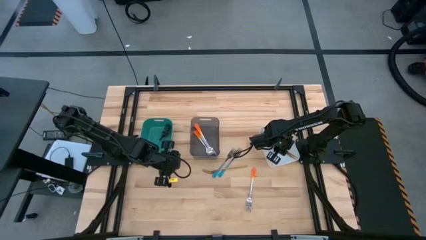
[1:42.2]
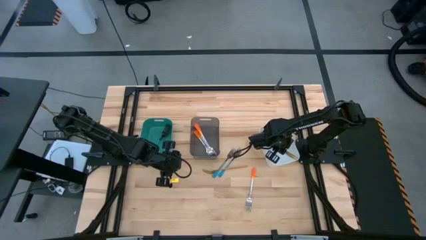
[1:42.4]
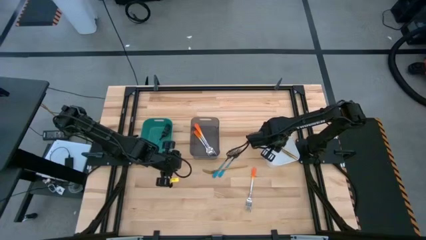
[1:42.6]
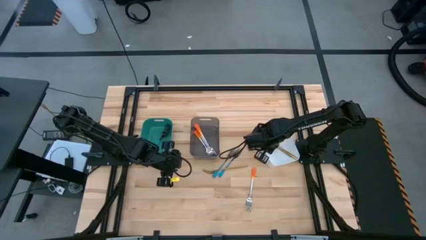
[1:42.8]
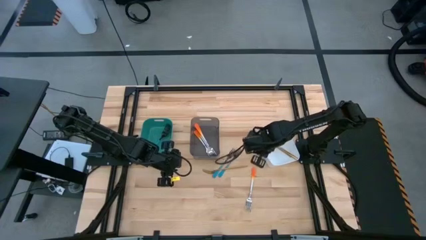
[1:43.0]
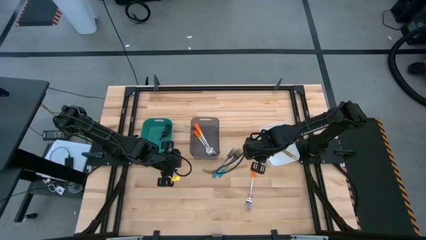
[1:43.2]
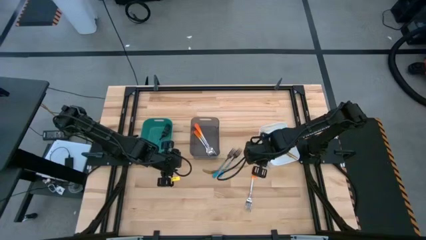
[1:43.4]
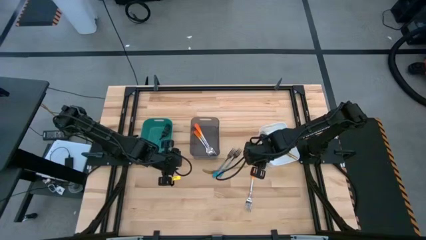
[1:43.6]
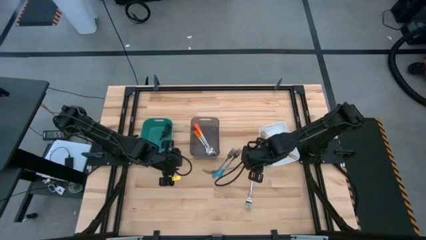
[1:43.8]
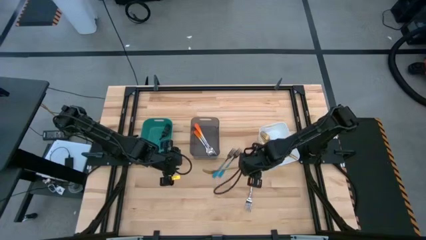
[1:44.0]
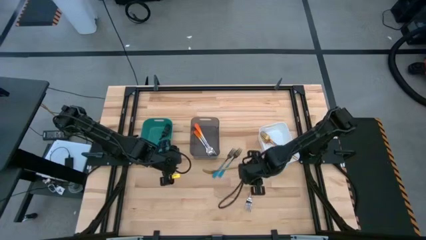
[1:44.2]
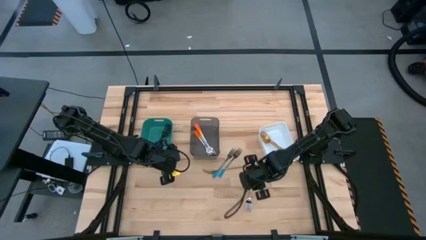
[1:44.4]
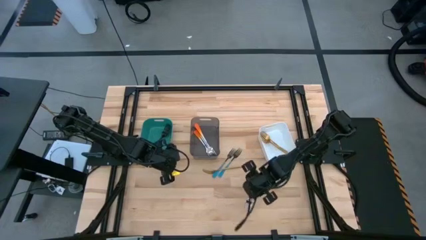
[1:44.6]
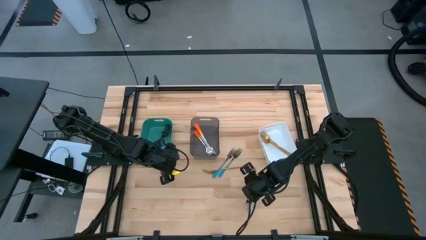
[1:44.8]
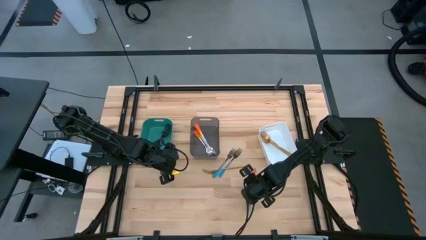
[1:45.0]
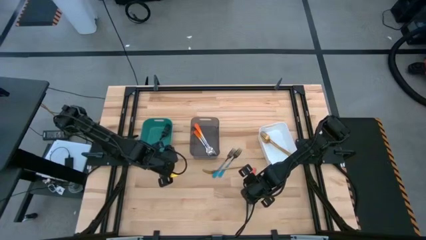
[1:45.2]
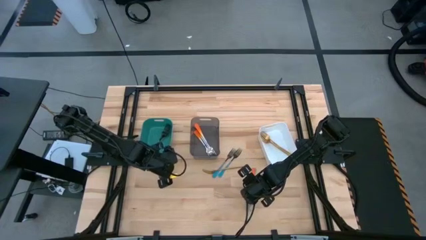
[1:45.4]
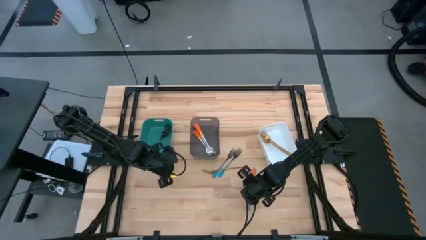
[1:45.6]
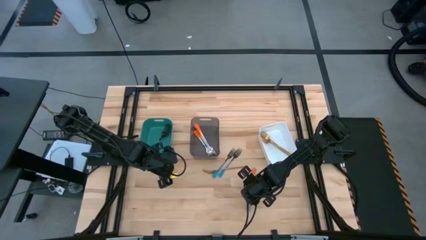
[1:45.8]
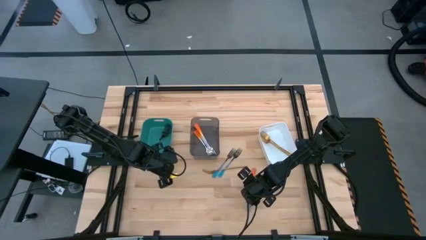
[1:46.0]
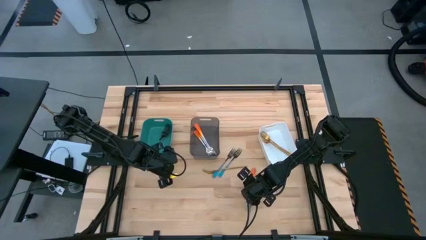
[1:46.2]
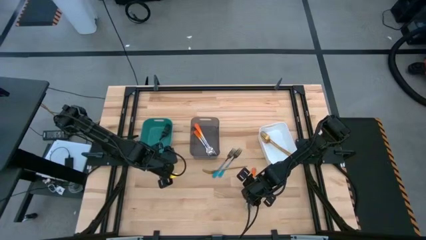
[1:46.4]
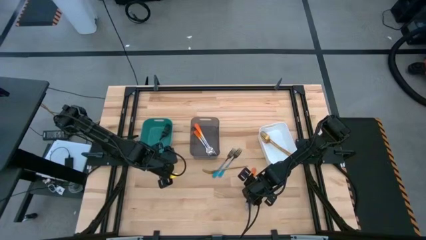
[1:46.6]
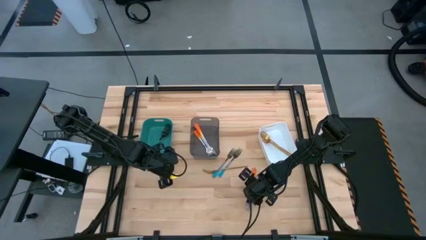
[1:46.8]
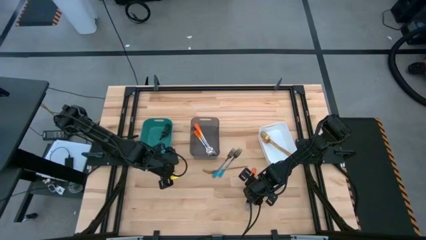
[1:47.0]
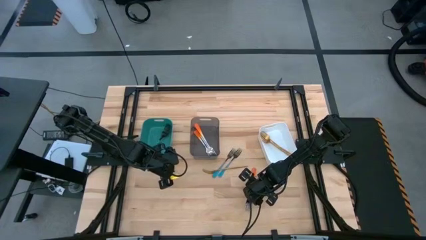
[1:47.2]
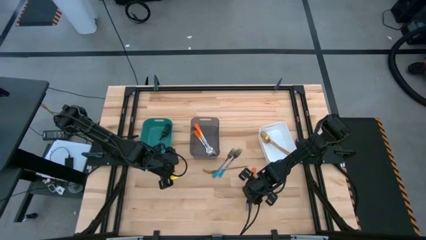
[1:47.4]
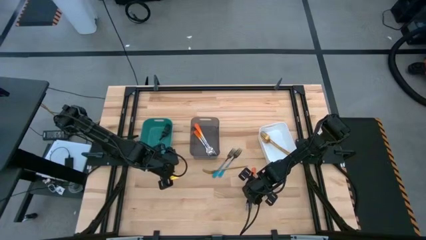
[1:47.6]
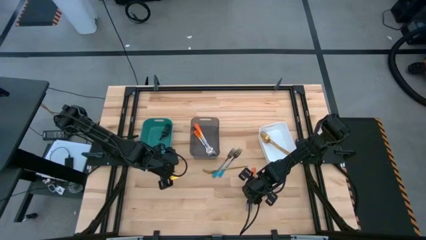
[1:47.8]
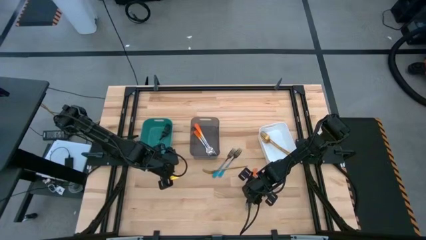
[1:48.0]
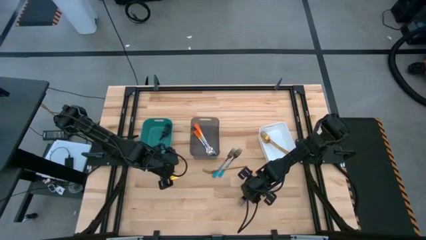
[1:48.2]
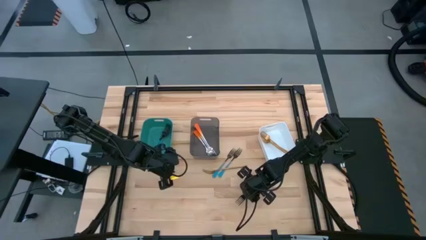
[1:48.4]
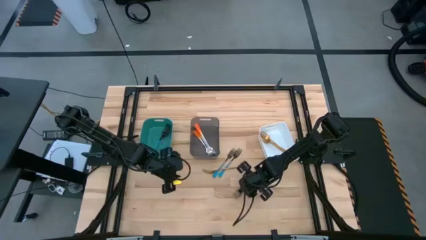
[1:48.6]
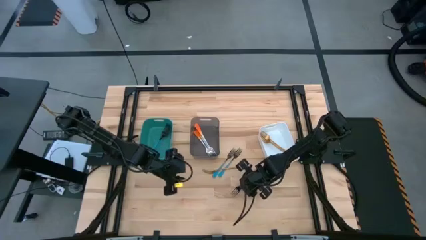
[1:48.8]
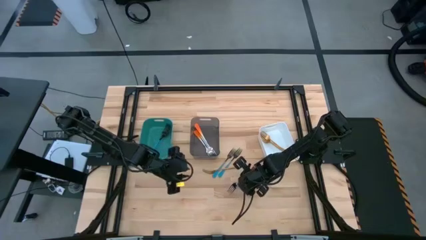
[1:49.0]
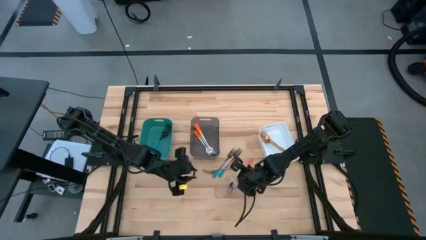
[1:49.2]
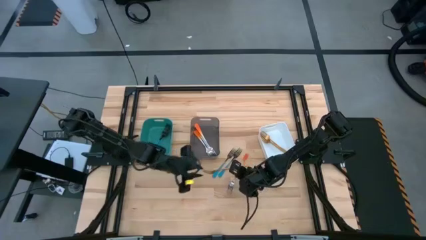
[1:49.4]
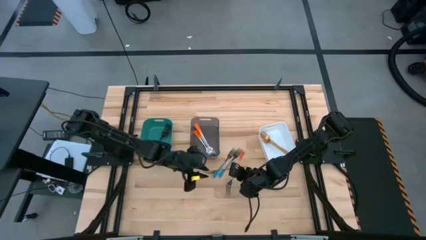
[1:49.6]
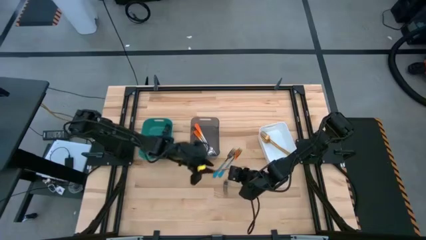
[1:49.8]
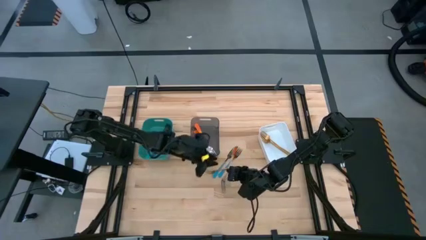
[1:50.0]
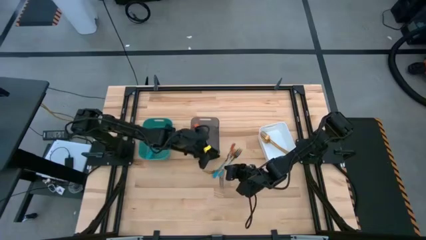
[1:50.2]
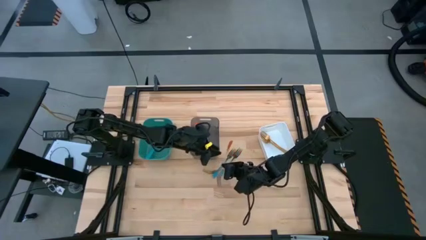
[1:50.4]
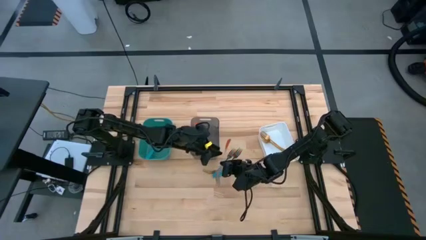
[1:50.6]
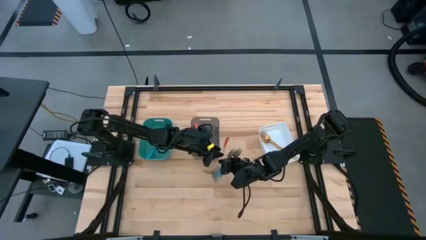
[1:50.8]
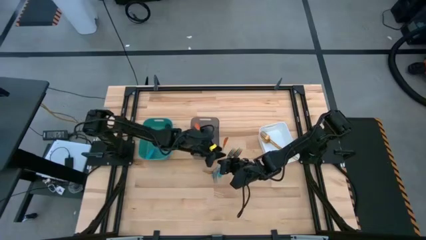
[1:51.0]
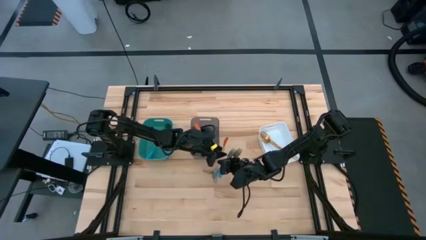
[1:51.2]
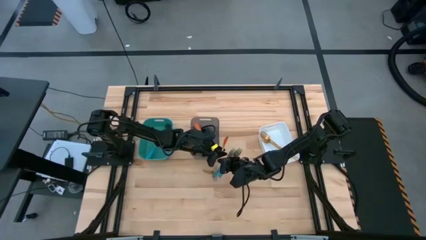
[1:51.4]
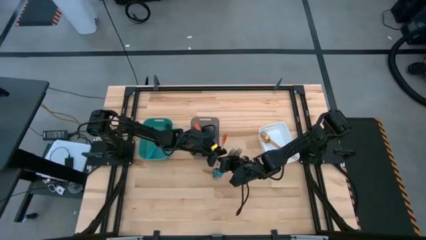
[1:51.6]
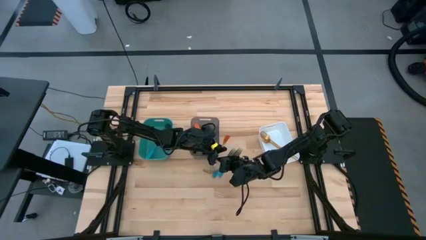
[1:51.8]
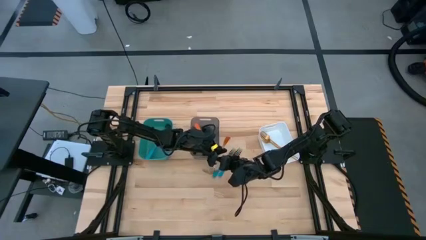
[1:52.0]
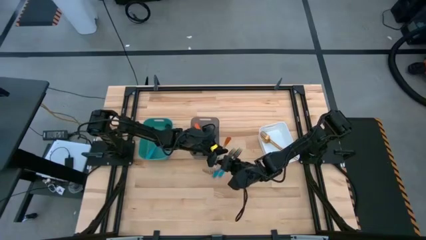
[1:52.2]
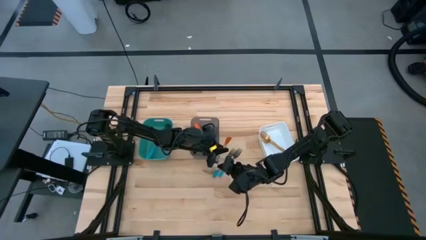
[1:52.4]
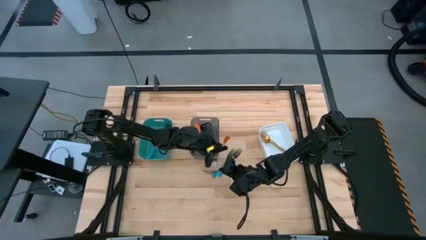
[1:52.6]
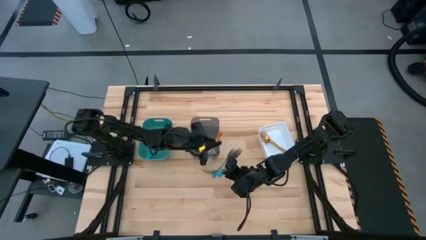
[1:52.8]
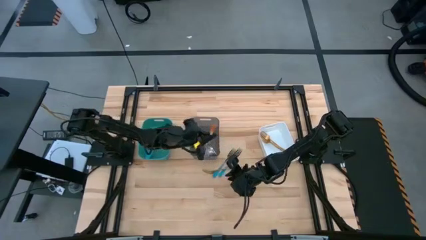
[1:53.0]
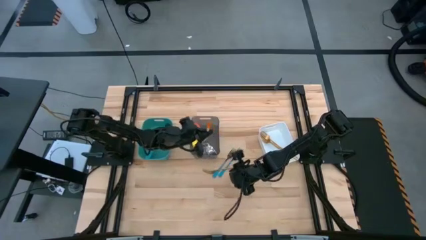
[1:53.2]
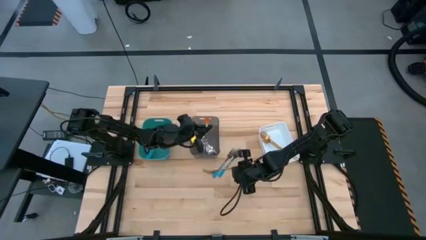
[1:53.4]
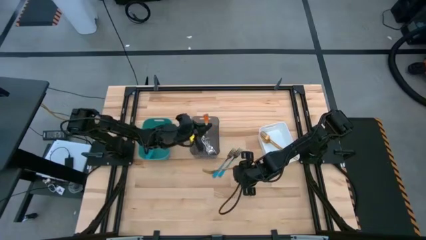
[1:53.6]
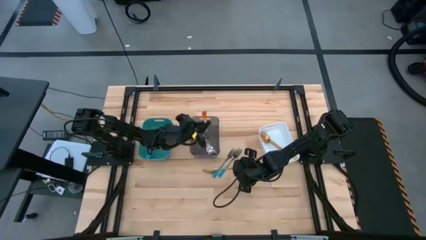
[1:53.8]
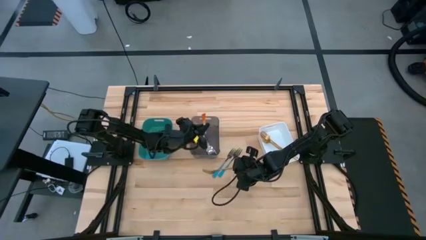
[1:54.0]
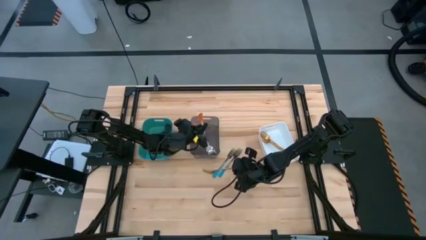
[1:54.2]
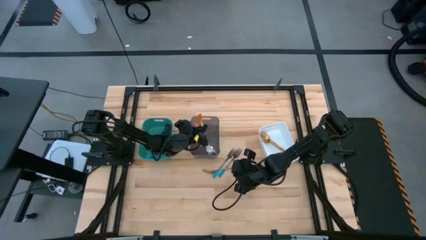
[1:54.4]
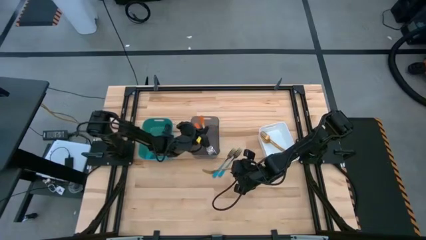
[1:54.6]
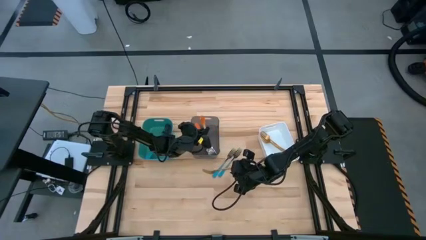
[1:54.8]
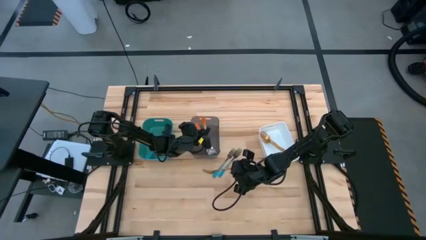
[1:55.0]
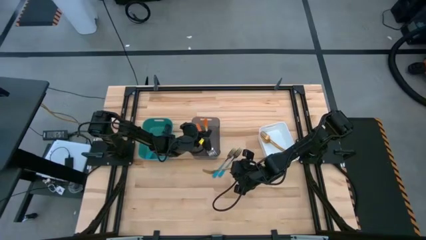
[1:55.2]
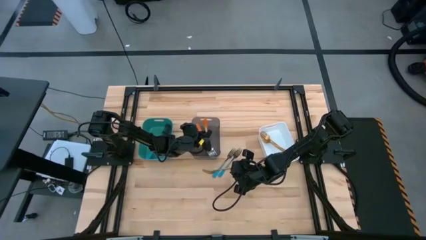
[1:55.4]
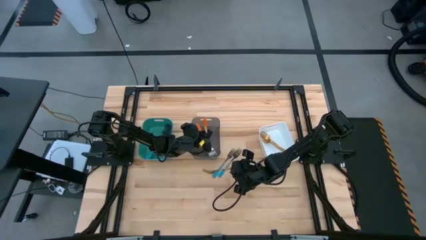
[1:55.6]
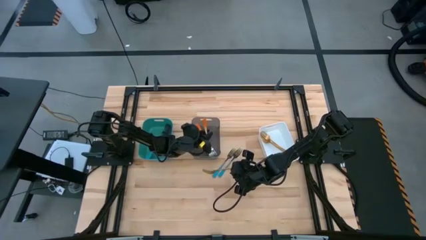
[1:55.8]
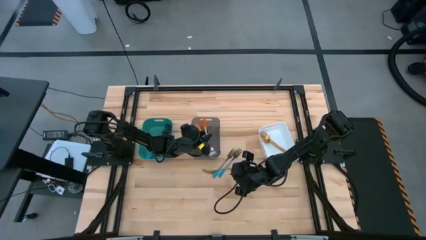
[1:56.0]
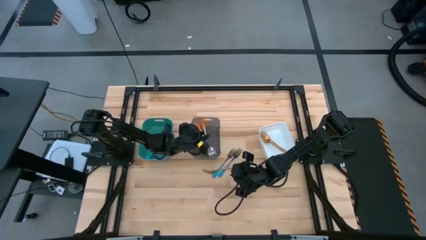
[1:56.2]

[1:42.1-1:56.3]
Task: Sort silverware by color (type)
Put the orange fork into the black bin

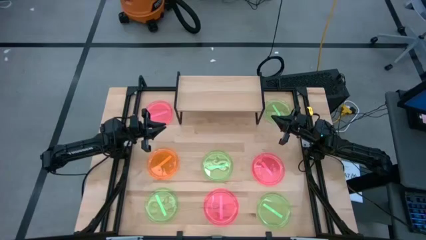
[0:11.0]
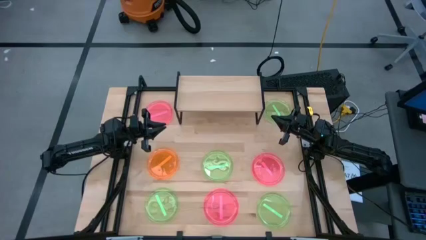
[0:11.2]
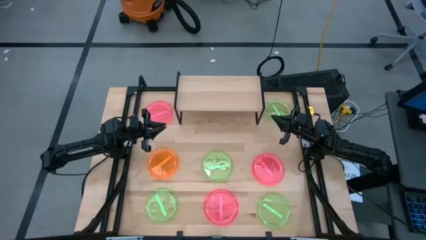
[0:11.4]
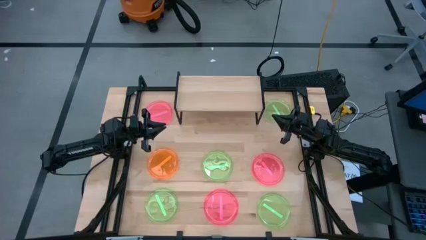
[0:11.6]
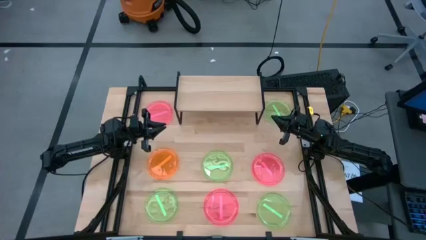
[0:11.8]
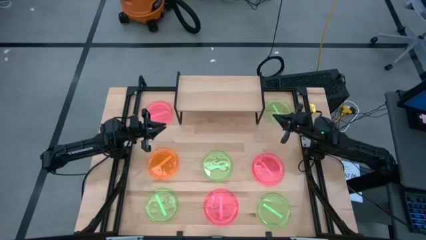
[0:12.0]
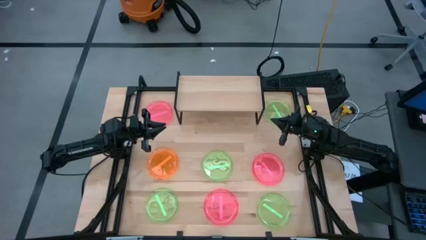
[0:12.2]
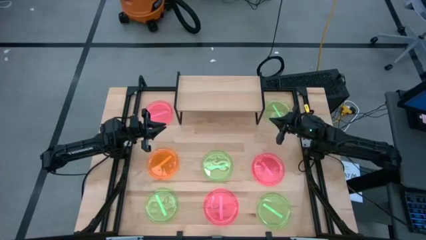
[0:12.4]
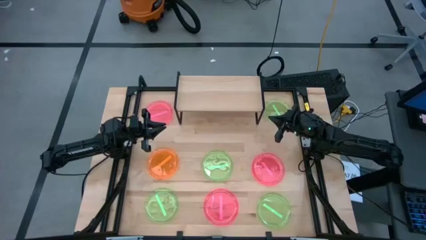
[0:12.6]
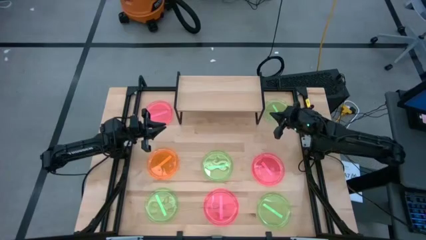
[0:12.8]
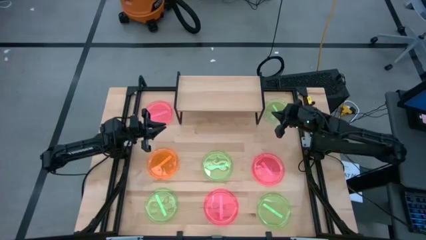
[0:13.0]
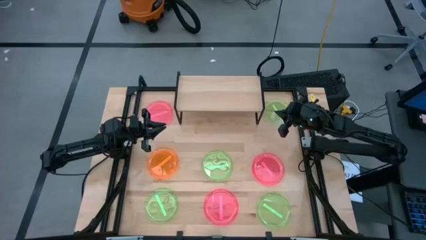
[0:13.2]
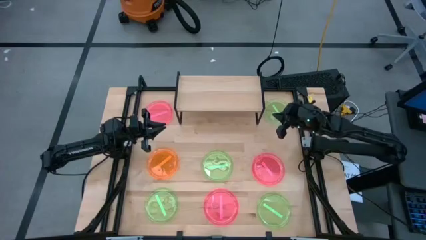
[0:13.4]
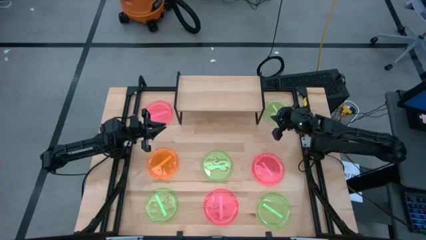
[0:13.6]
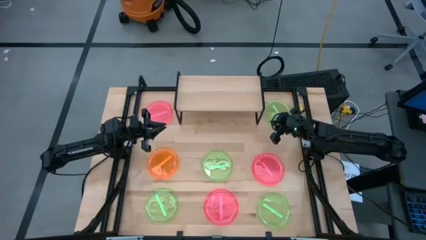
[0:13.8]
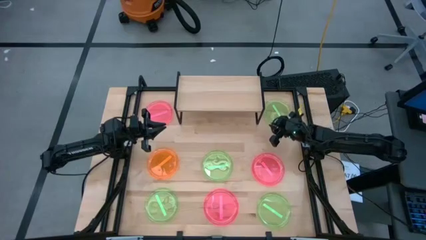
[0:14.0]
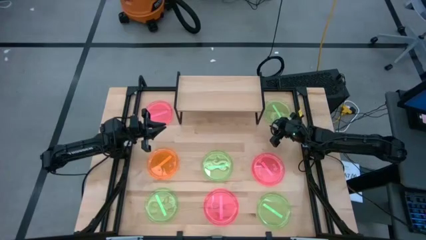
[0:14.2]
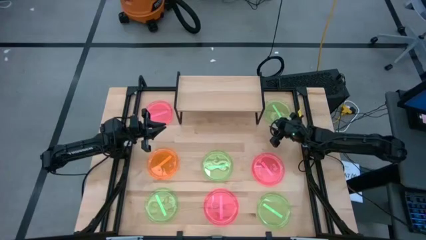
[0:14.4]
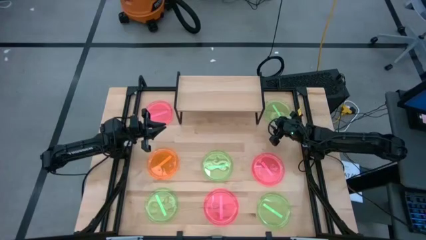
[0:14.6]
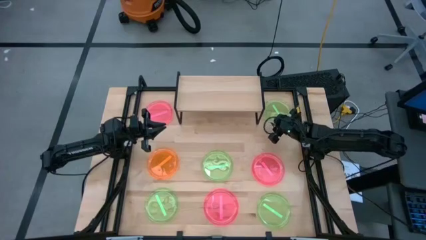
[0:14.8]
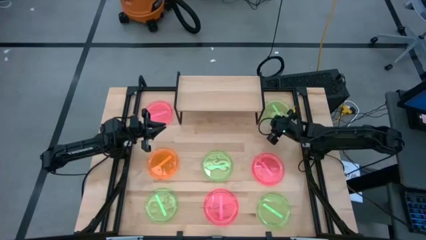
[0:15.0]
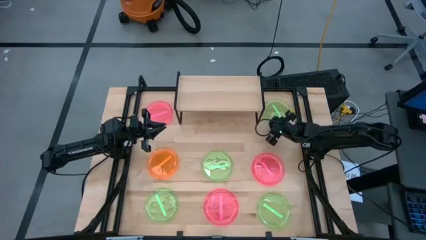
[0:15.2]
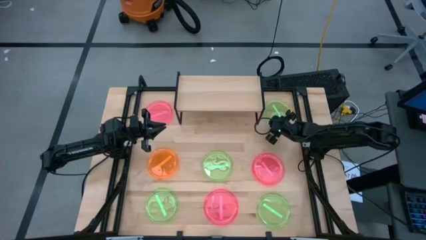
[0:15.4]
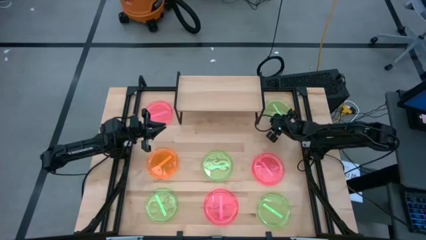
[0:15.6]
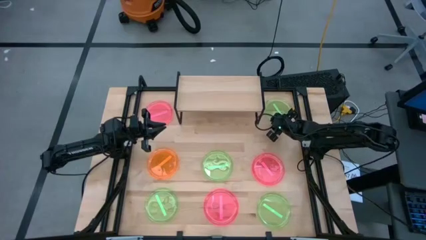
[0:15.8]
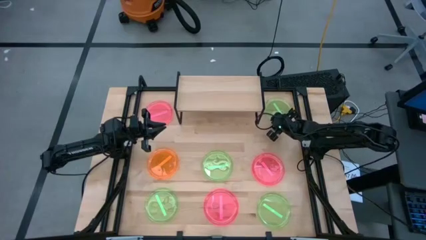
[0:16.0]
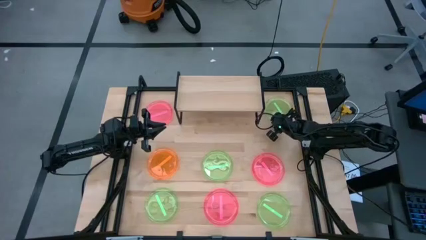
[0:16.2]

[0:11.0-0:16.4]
Task: Place and stack plates onto a shelf
Put the green plate on the shelf
